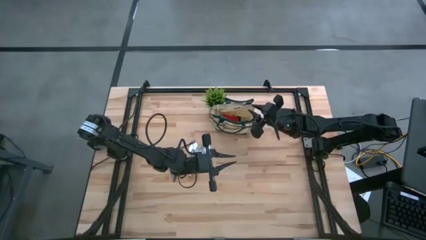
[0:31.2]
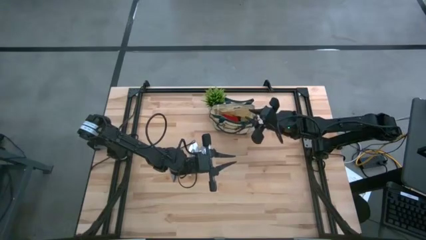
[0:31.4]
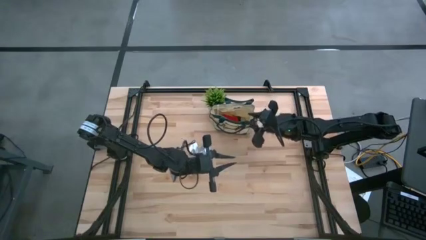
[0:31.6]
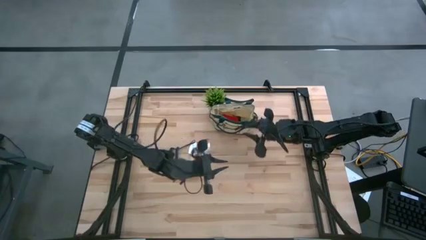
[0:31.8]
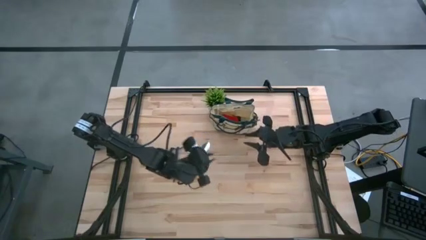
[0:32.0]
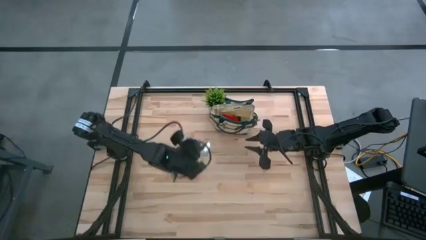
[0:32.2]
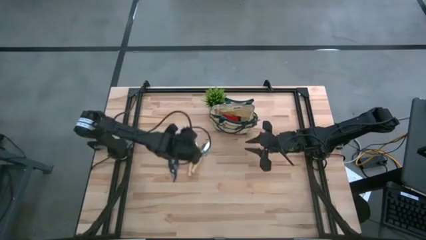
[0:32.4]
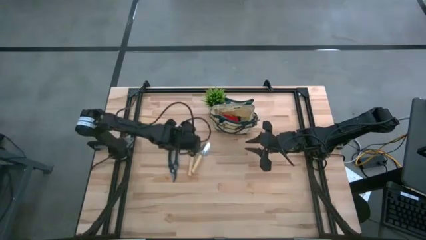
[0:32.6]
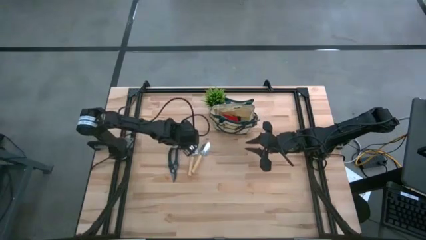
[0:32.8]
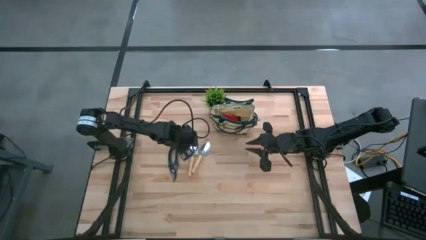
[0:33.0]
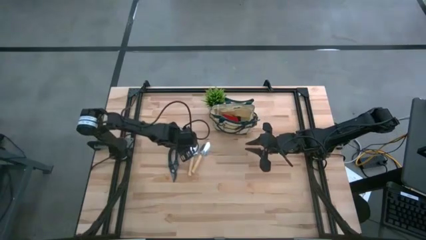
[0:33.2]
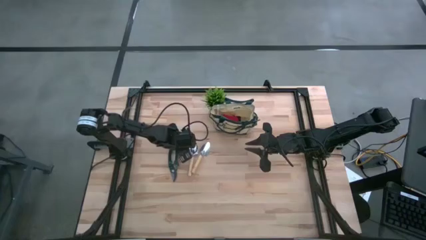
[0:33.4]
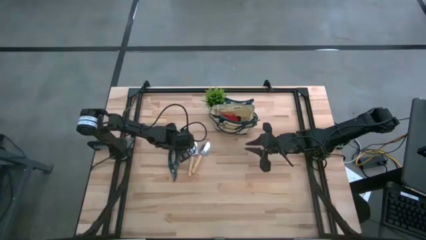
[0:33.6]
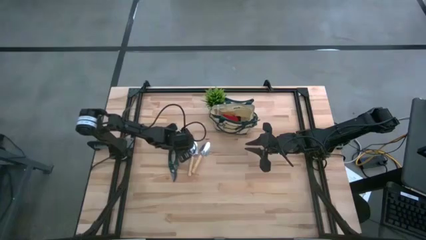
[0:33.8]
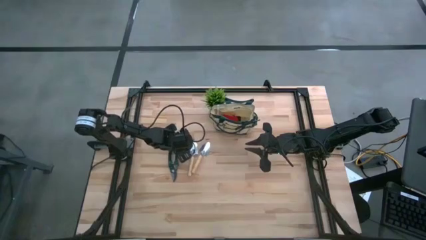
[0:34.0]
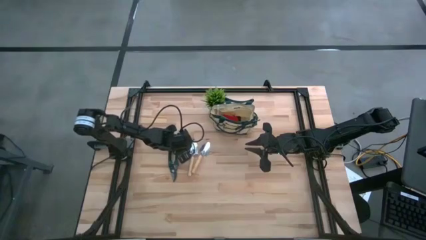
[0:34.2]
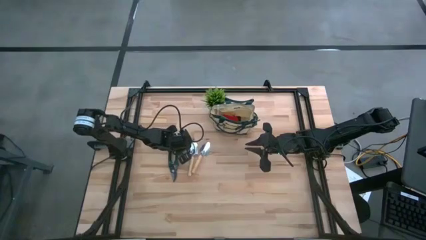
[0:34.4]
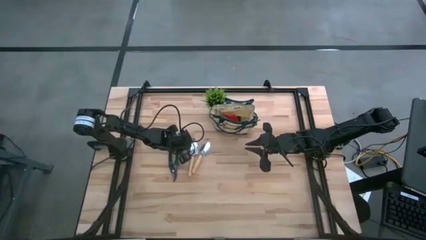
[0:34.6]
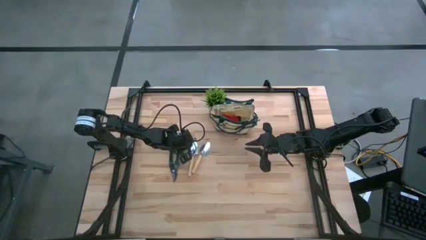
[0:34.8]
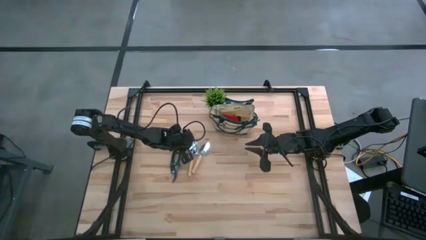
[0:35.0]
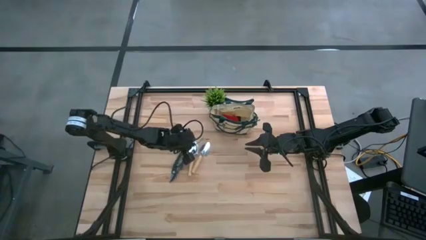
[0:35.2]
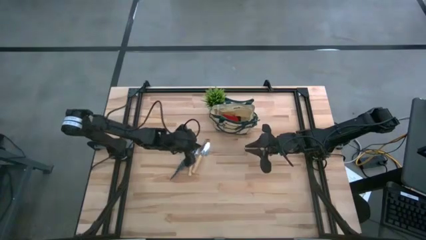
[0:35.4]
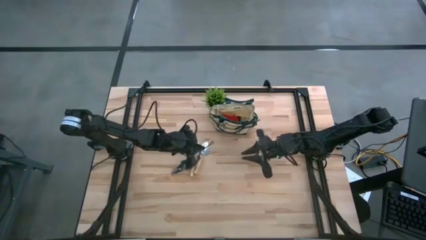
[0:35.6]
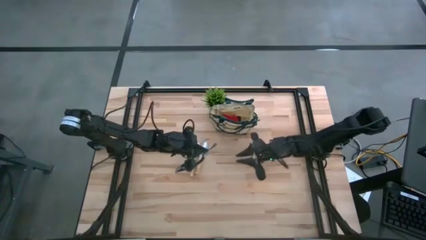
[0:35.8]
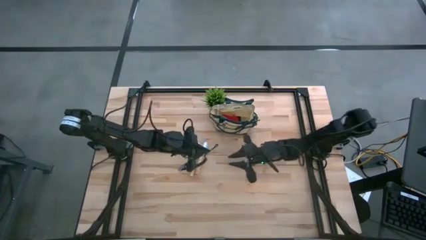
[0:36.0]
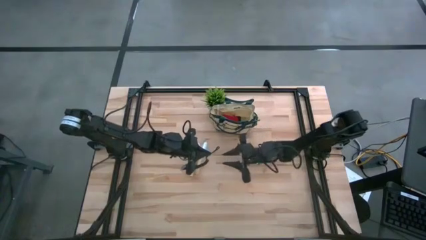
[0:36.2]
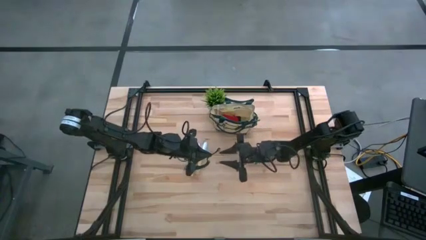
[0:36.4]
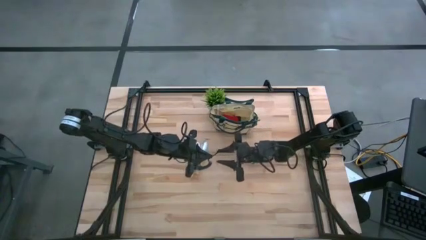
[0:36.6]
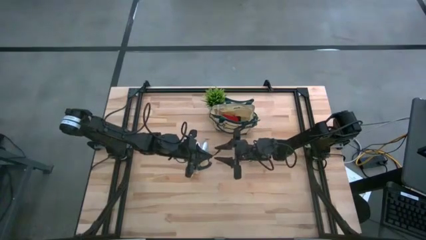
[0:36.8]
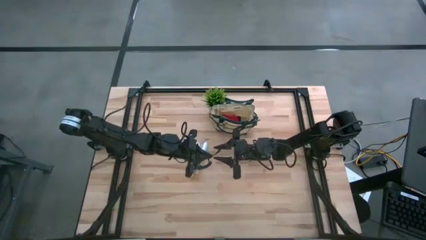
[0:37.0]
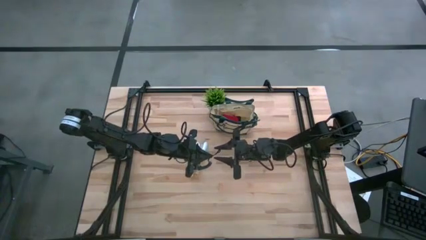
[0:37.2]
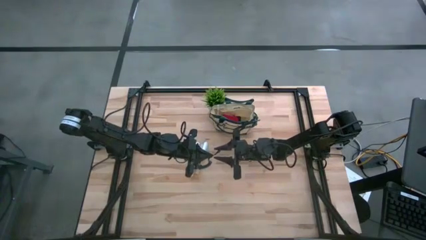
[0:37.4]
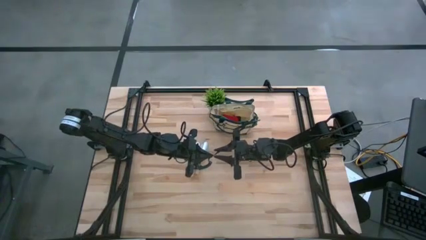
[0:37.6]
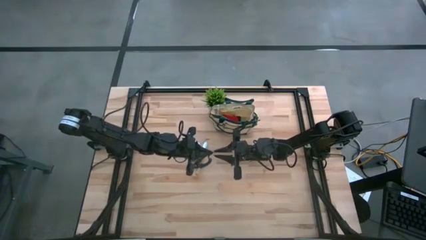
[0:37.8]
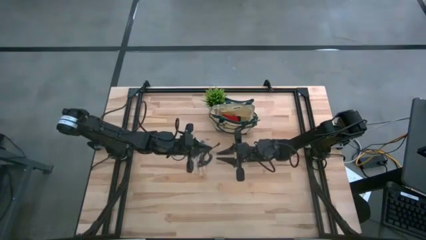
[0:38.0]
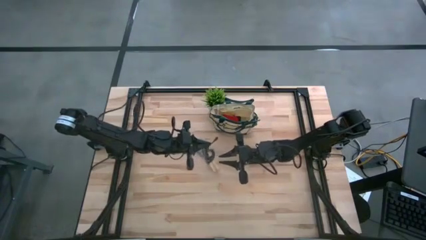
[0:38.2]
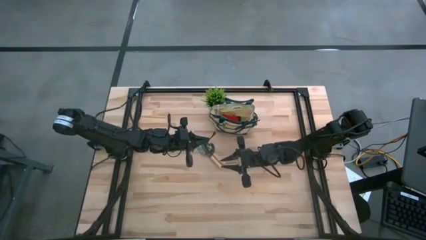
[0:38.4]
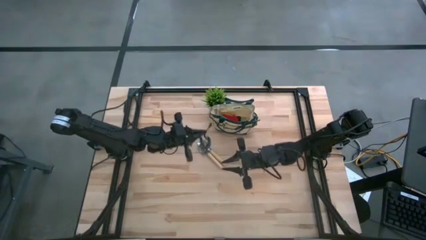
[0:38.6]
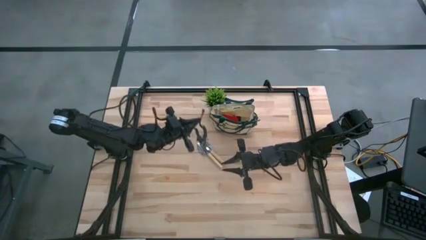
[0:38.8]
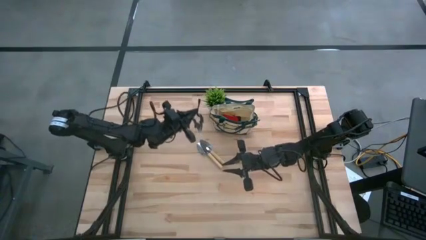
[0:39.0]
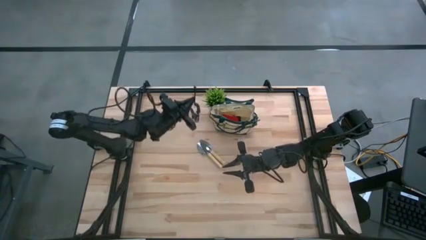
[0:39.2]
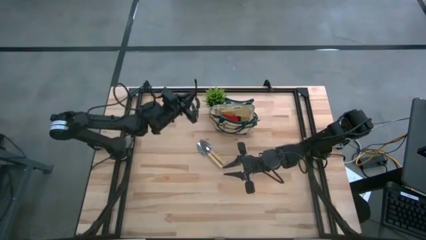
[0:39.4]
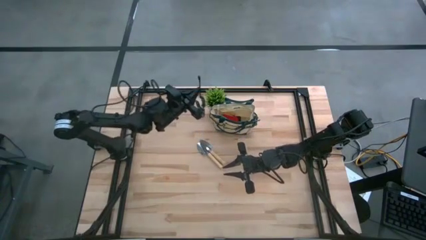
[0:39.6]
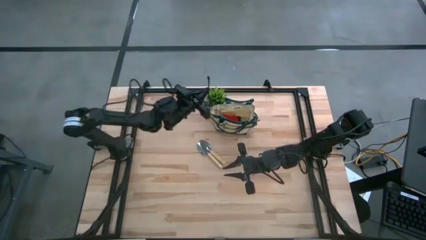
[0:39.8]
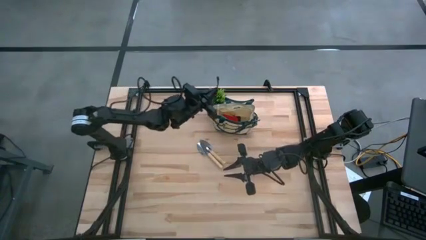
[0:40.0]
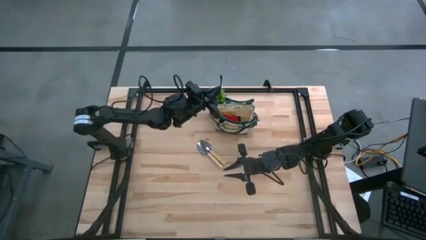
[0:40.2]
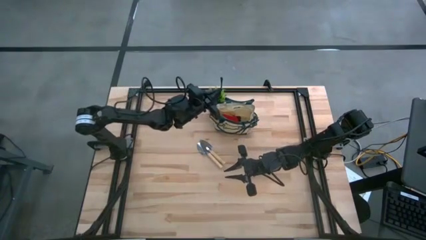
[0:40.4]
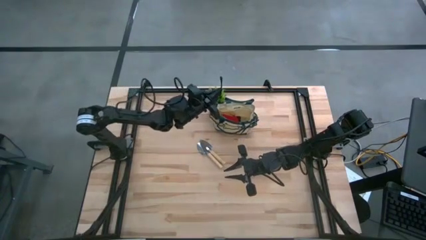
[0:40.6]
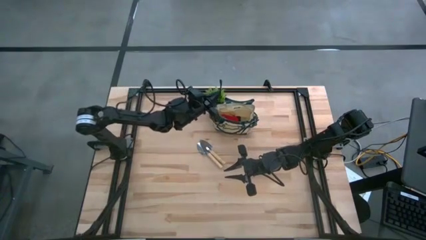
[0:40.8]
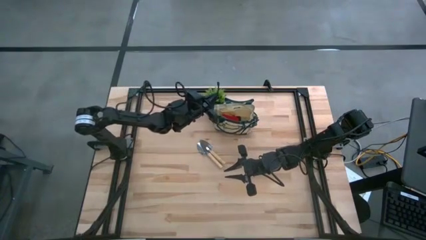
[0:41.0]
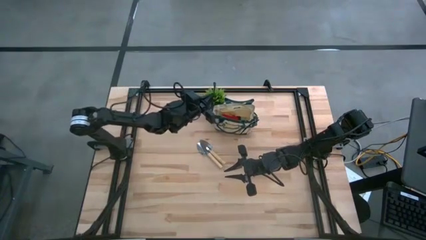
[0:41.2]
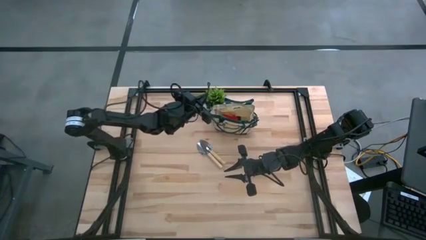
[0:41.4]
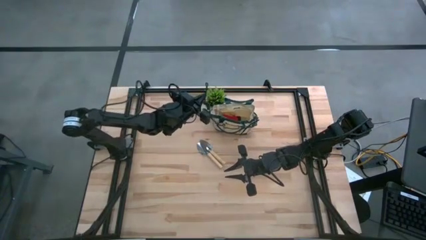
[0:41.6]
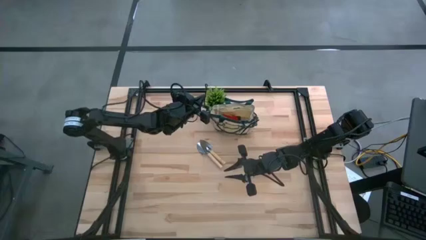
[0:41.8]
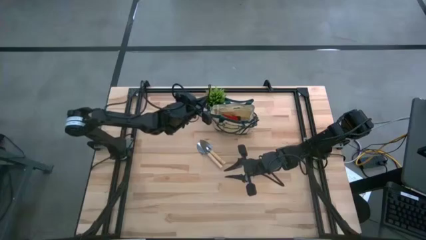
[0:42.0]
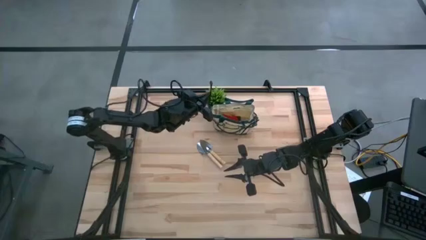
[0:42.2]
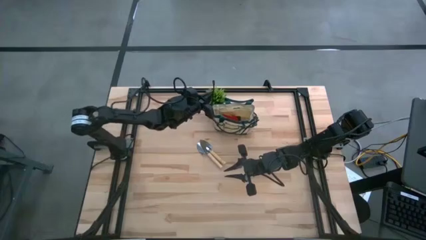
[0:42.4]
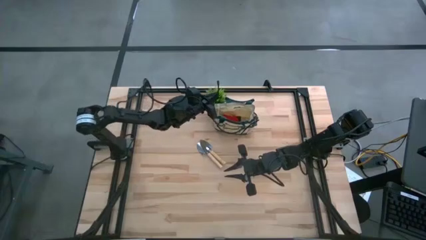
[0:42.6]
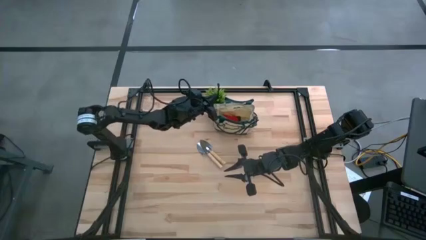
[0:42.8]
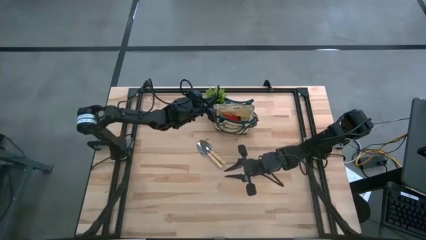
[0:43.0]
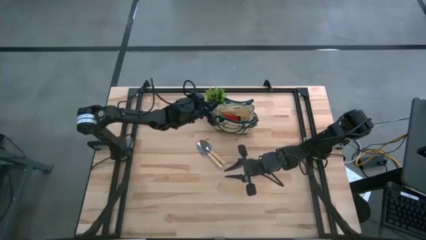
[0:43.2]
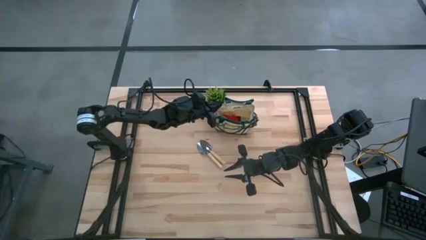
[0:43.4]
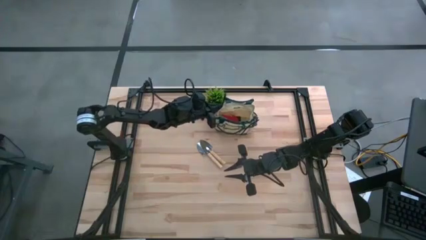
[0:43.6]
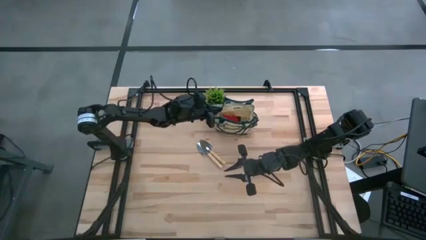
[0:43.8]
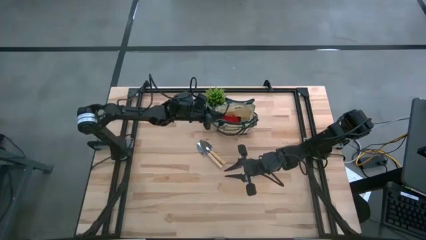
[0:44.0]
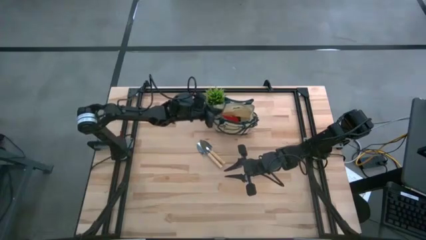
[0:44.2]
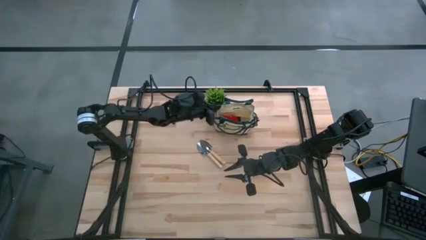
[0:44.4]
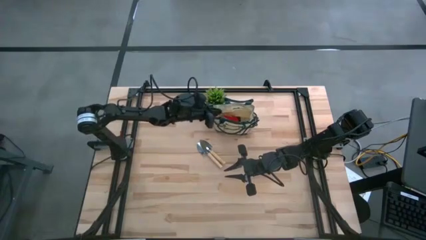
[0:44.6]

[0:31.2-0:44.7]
Task: Pick & Place Garden tools in Gardening bag
Put the green shear scissors into the gardening bag

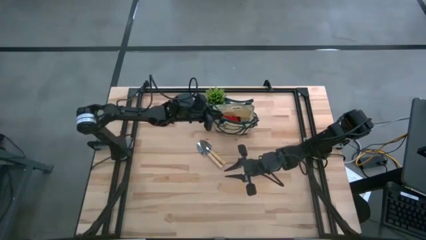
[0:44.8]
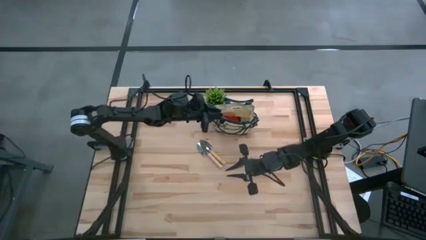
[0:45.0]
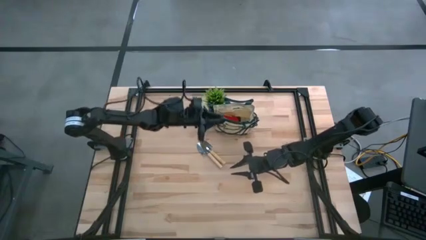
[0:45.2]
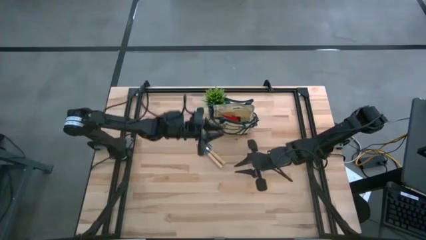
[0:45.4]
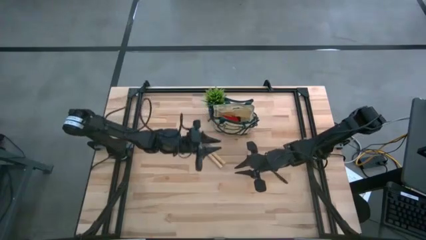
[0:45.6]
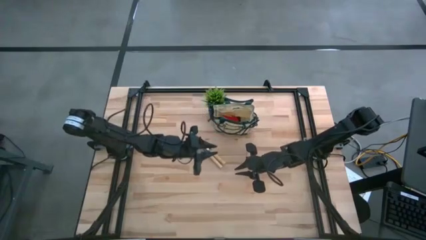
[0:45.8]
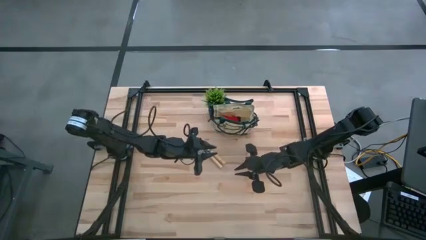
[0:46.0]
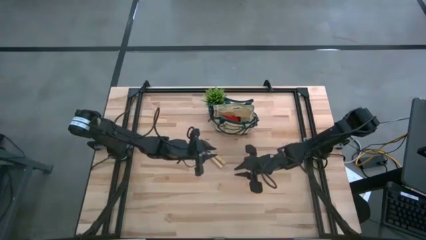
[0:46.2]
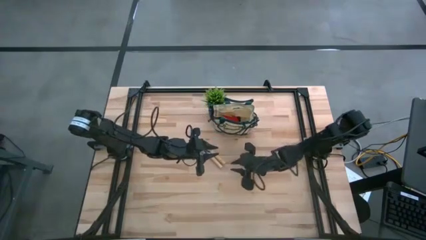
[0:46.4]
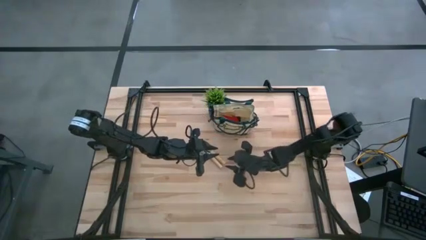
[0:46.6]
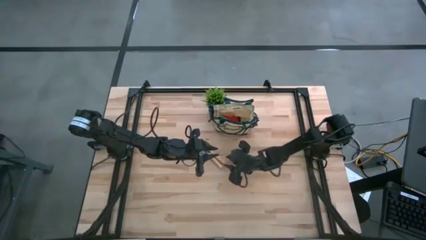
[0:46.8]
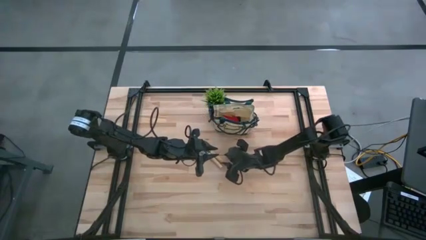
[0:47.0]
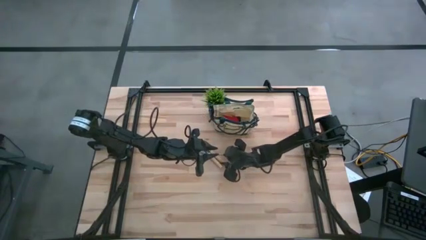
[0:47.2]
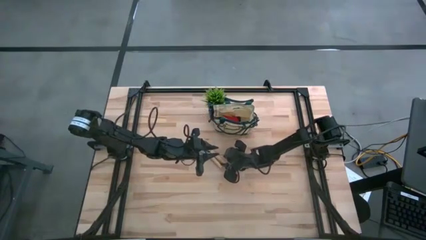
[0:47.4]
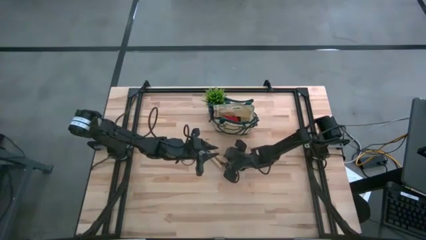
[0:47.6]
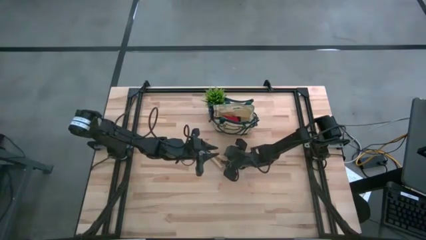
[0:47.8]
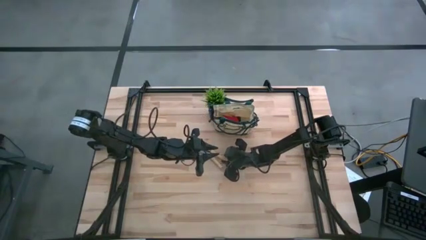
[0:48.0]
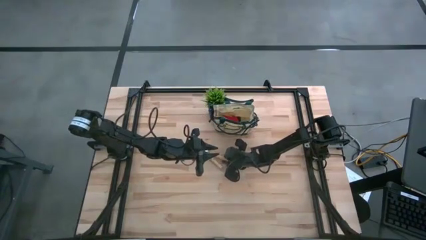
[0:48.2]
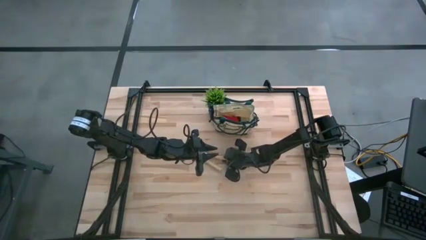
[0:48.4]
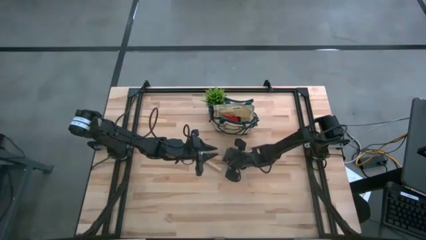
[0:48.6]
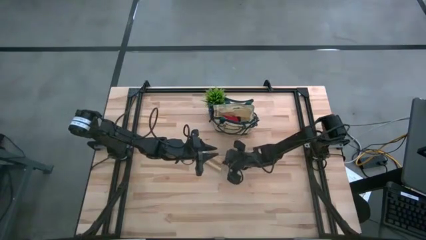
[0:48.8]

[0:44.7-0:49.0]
Put the right brown trowel into the gardening bag
